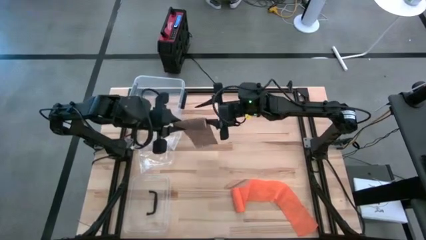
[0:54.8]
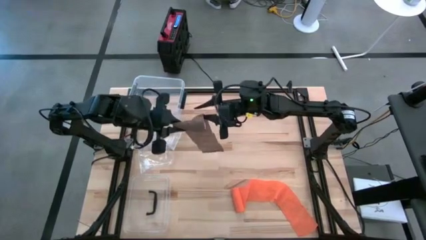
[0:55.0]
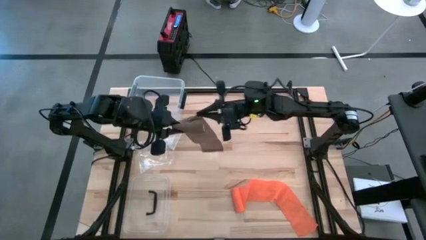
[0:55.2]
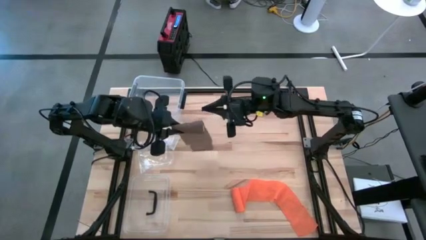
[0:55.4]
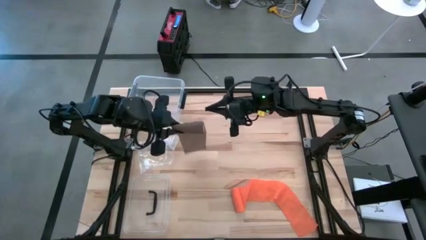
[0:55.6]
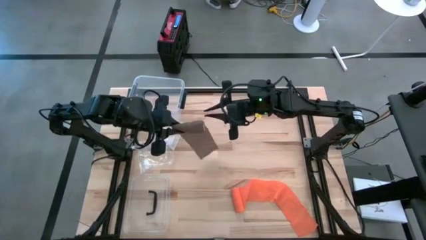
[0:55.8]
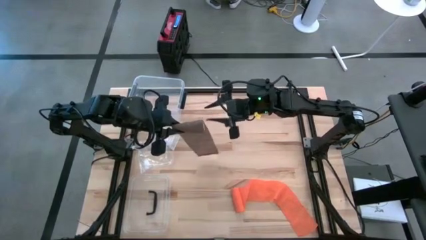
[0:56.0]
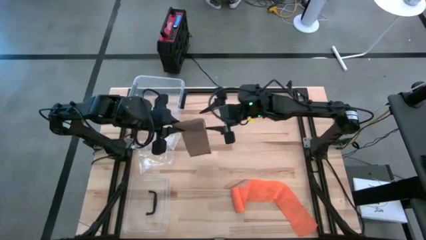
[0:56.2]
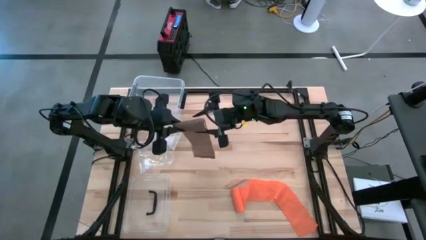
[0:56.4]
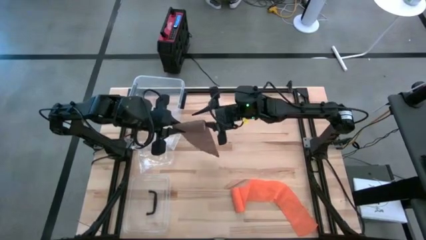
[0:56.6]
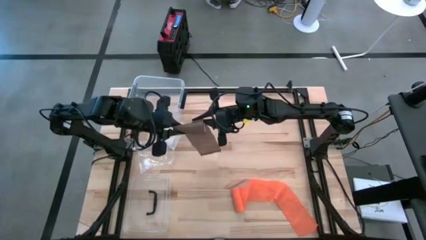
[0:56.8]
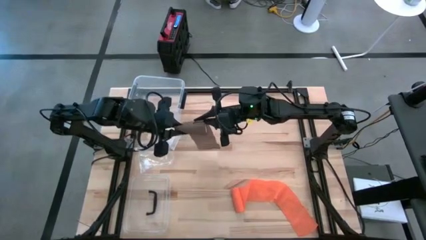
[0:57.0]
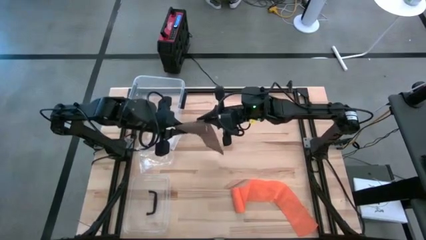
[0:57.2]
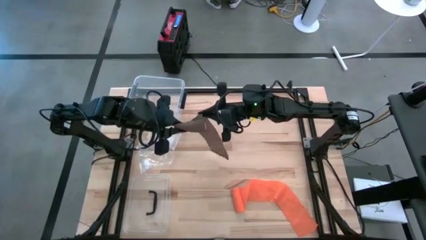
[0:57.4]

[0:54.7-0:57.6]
Task: Roll bandage
Roll the brown bandage

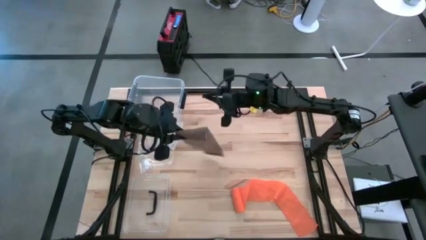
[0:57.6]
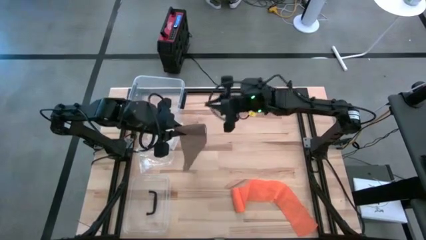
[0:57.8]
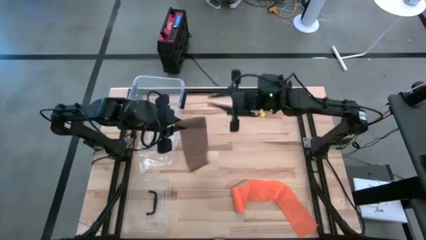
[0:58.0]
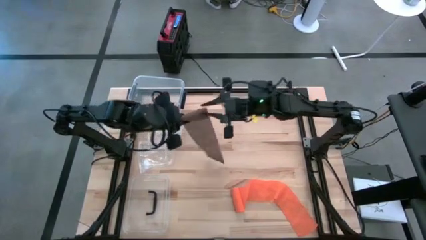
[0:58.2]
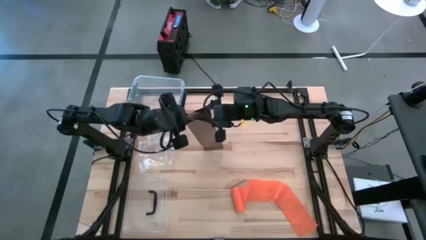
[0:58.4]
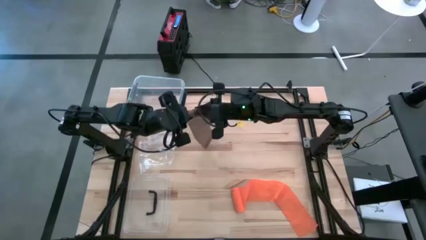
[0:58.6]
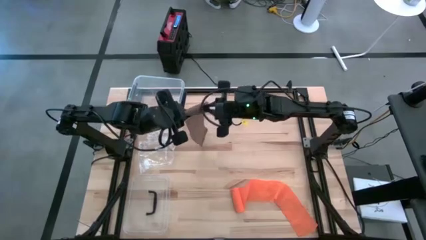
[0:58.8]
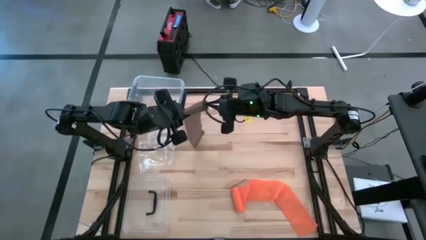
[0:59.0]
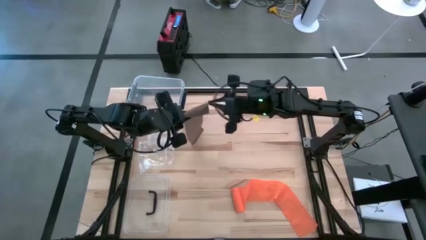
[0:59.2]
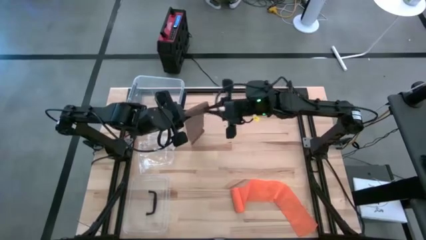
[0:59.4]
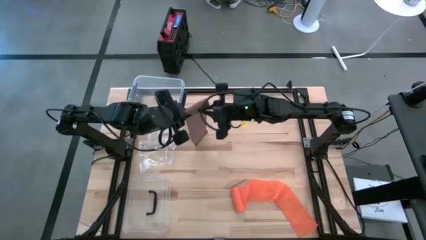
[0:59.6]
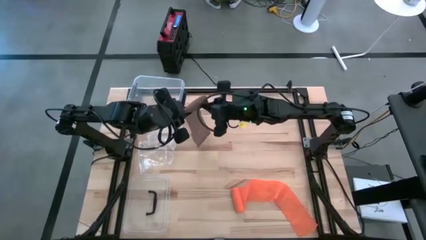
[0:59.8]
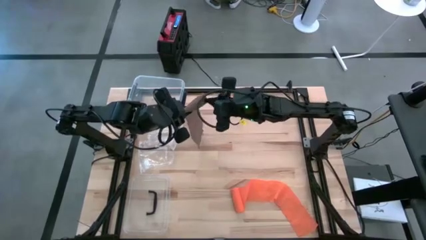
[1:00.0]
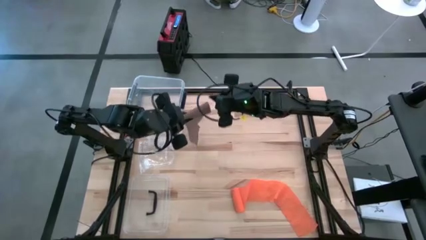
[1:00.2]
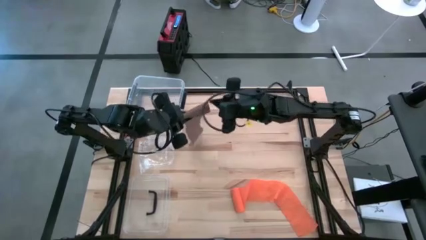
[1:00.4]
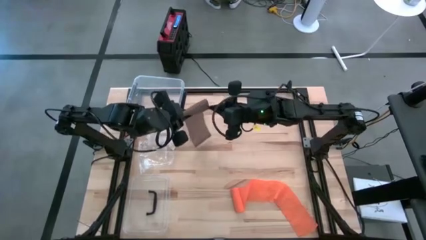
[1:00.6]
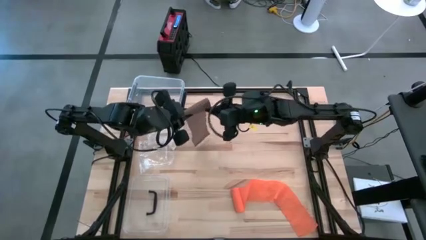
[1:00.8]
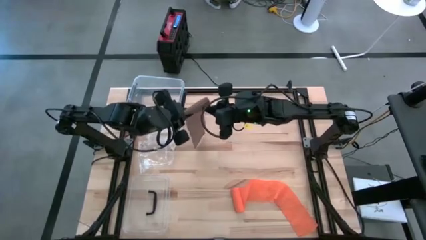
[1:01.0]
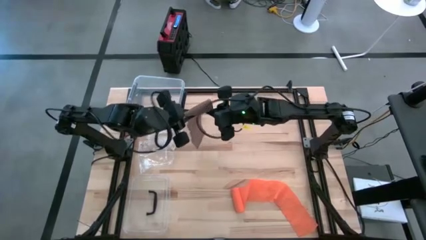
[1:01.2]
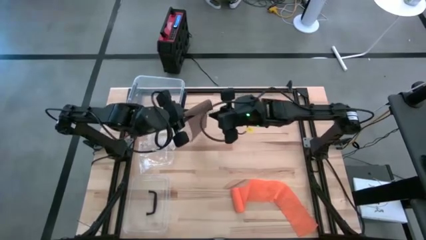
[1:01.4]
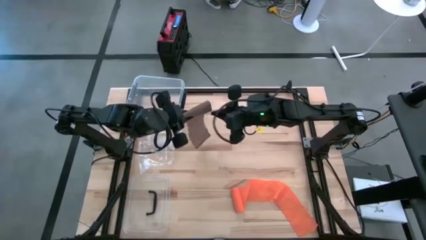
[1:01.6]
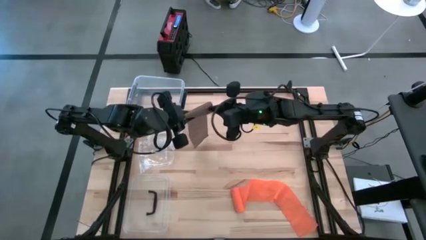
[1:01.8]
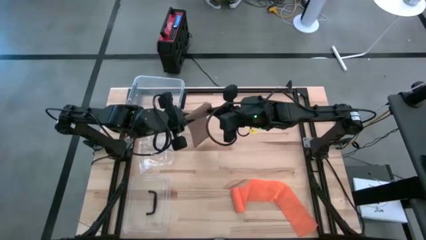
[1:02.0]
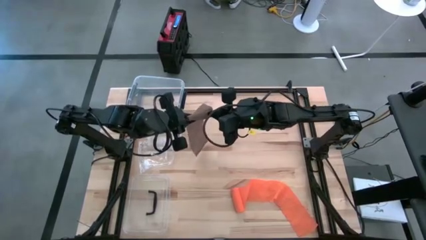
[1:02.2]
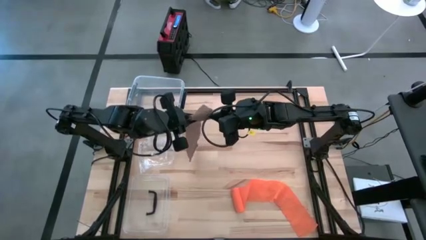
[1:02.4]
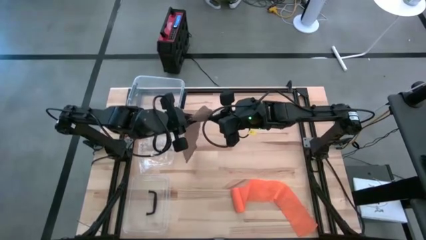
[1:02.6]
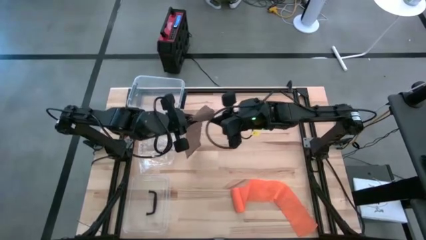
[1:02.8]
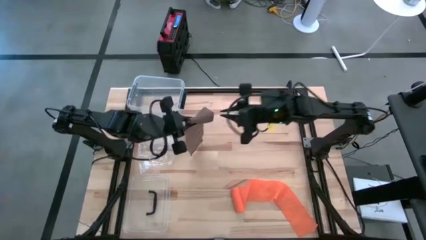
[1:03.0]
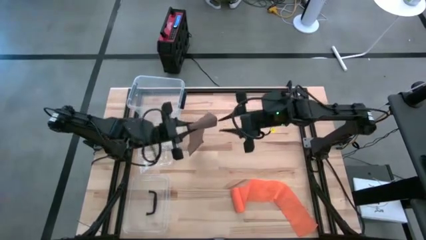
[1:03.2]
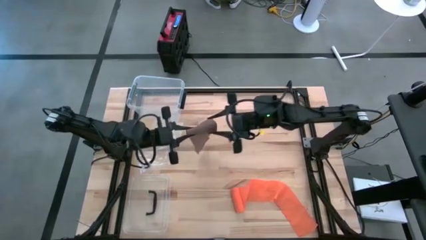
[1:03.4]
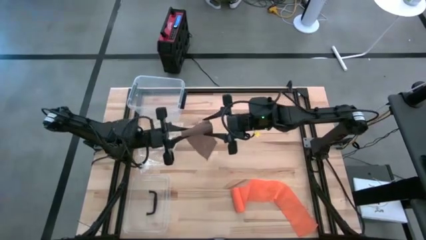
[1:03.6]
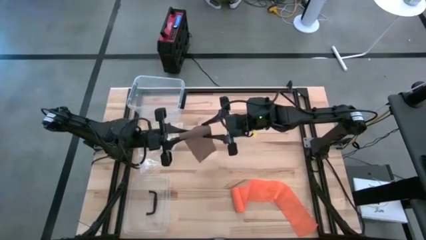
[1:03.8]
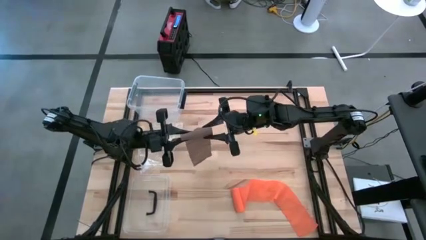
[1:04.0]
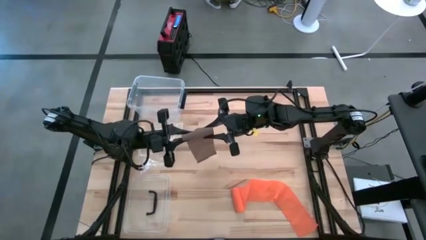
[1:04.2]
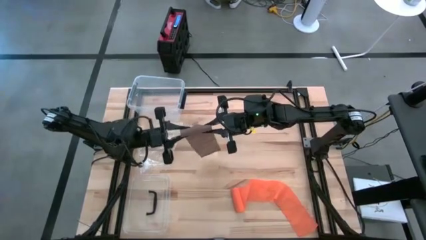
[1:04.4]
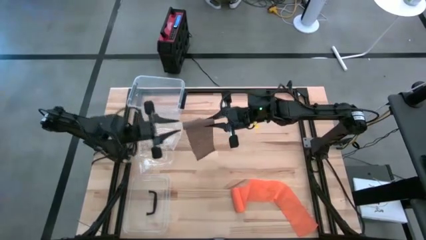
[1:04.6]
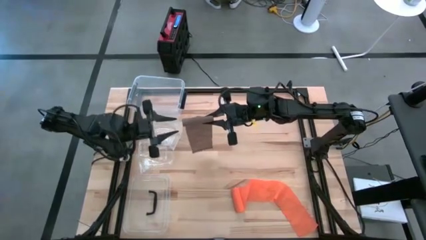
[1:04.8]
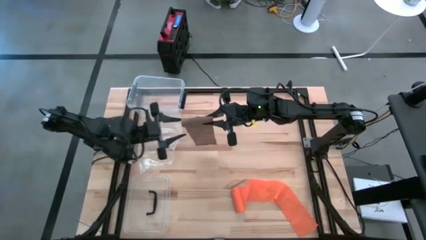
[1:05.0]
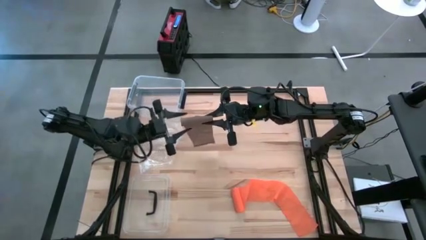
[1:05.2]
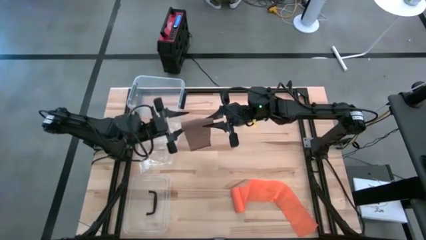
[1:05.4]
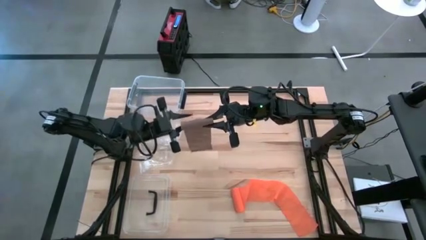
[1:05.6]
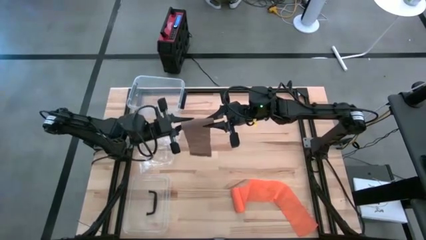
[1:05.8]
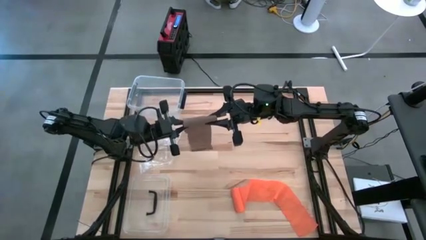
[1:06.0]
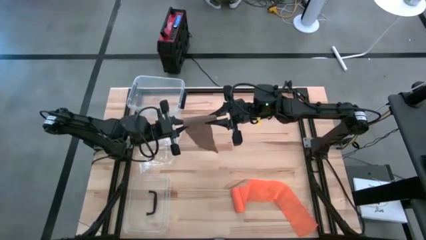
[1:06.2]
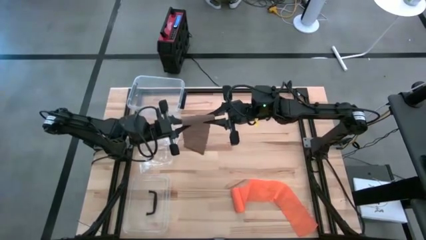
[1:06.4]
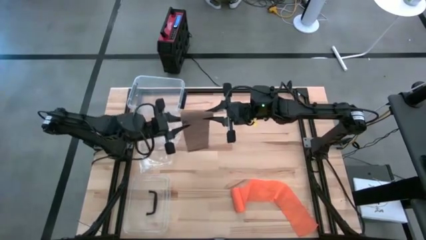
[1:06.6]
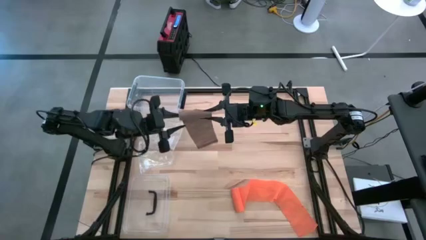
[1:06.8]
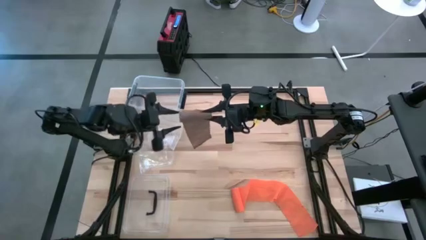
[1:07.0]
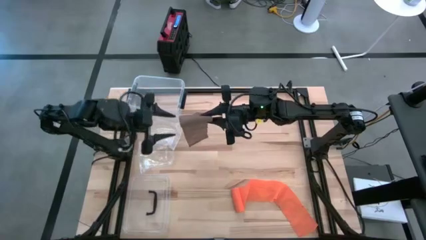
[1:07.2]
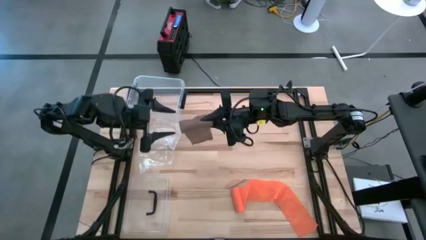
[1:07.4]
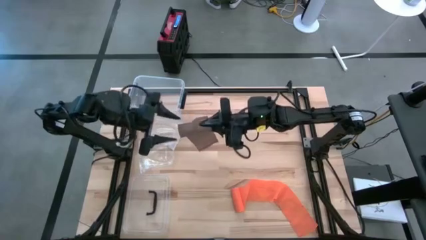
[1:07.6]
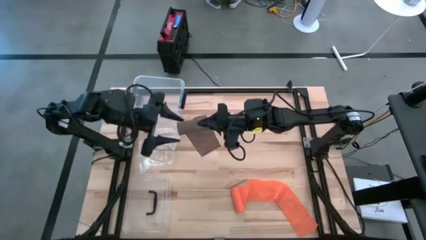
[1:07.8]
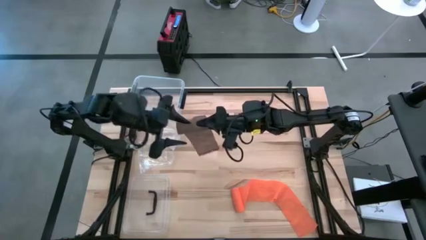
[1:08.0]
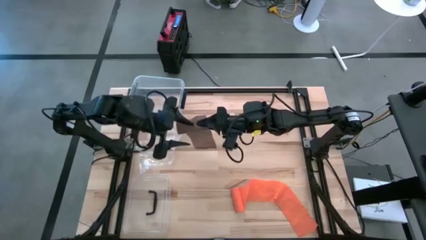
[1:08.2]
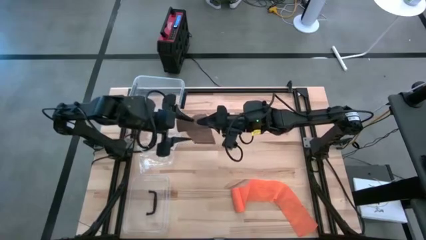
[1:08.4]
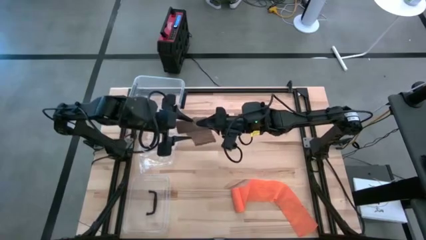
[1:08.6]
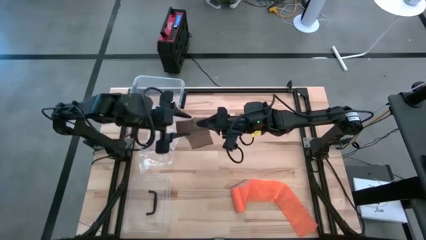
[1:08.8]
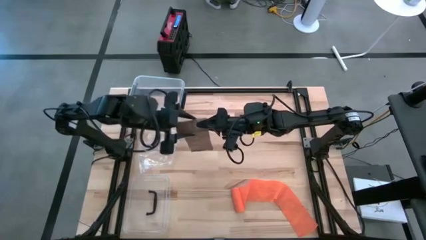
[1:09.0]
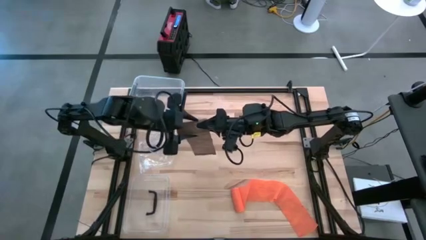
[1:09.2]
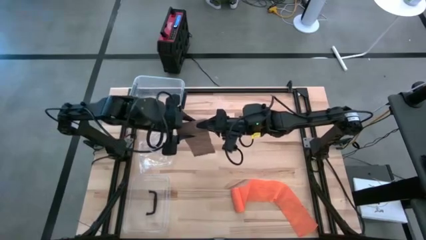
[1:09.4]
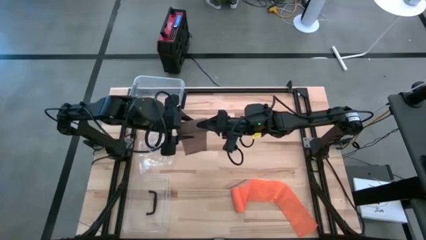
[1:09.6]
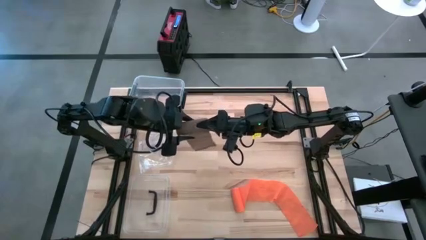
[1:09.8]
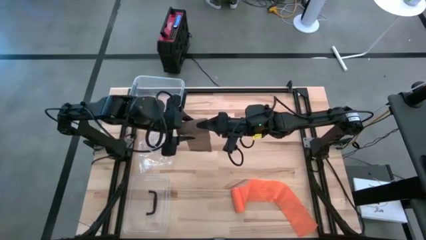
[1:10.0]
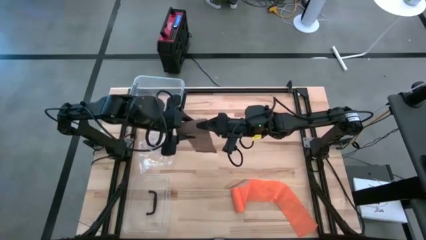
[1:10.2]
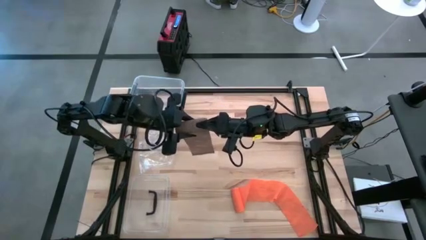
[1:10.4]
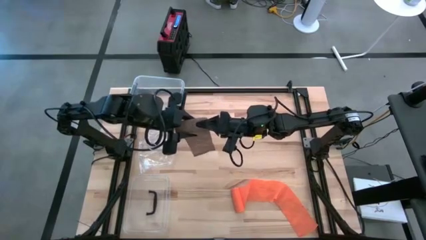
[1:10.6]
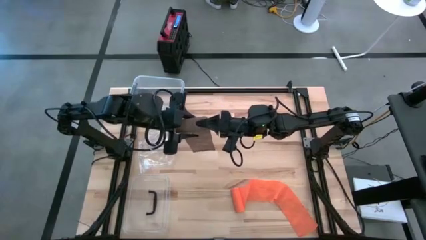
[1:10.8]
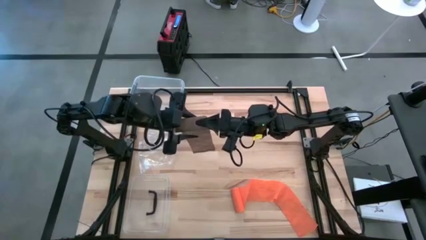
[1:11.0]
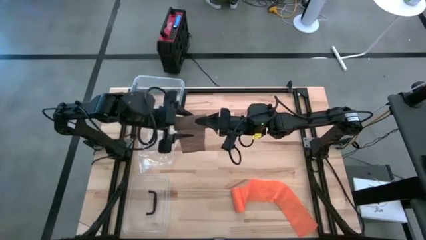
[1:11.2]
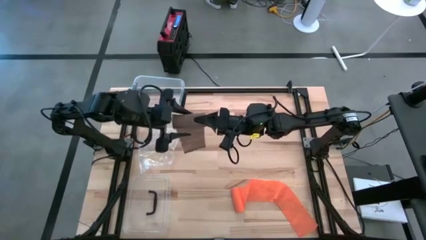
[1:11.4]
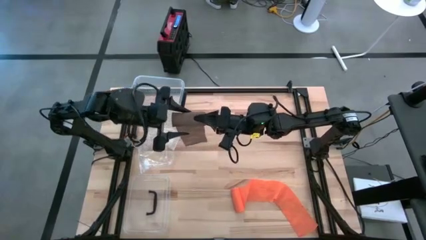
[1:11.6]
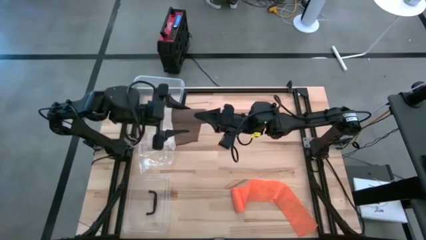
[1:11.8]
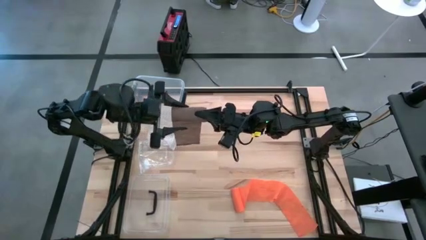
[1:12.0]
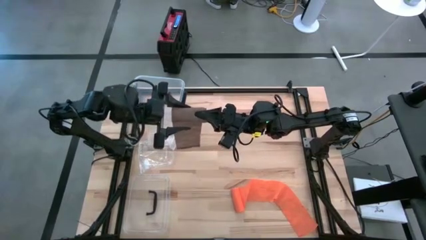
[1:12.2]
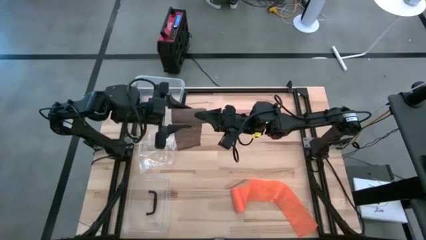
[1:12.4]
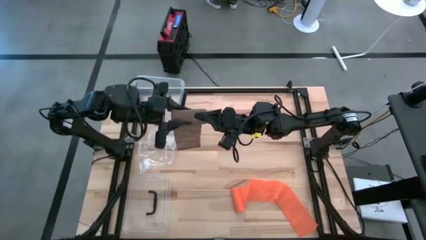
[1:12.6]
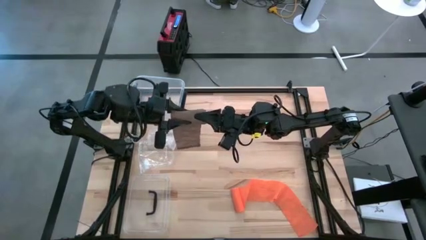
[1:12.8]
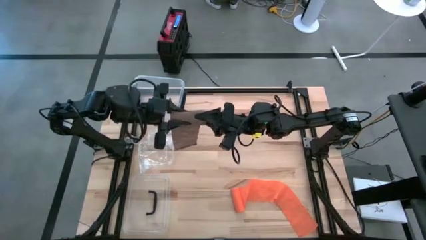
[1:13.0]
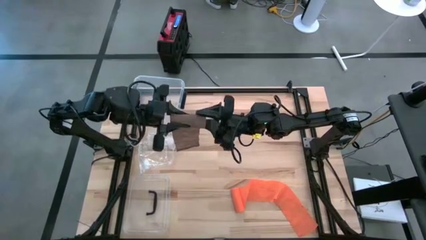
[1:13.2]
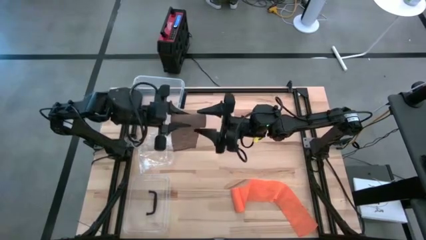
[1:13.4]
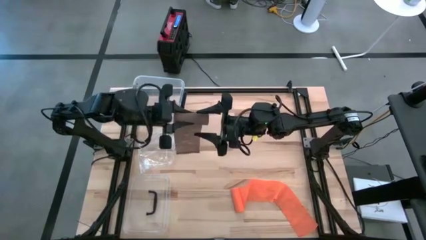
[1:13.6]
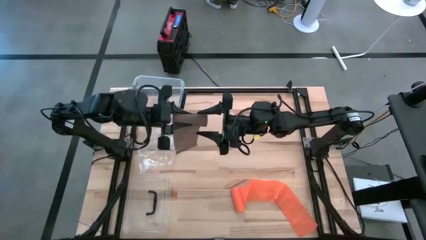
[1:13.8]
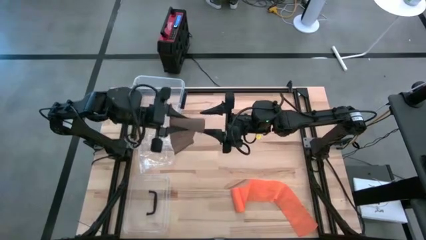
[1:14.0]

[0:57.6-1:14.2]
Roll the brown bandage
